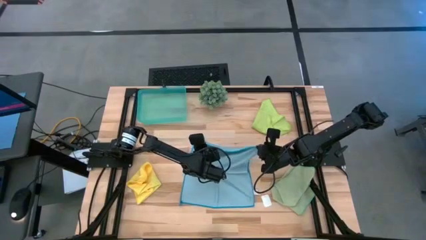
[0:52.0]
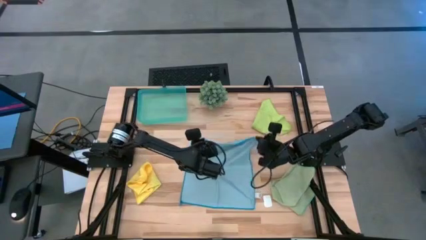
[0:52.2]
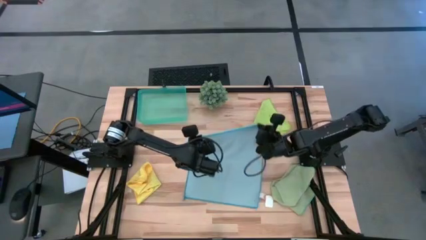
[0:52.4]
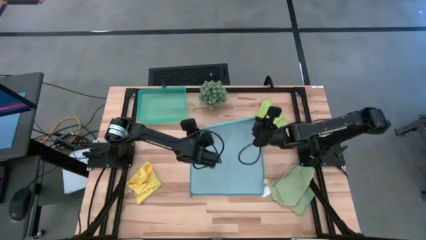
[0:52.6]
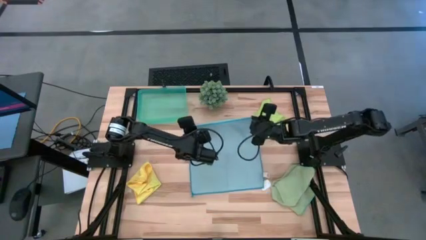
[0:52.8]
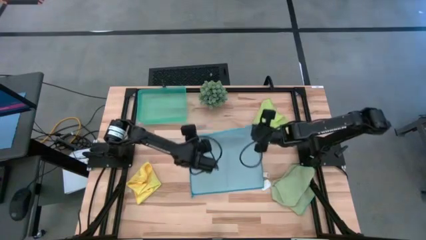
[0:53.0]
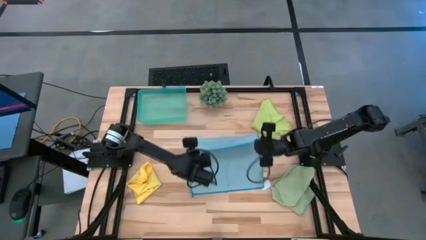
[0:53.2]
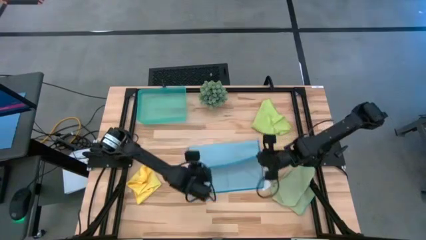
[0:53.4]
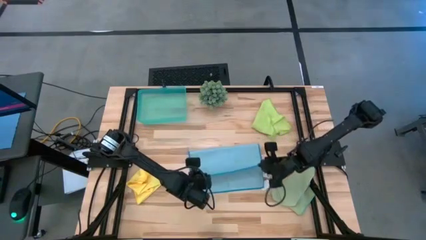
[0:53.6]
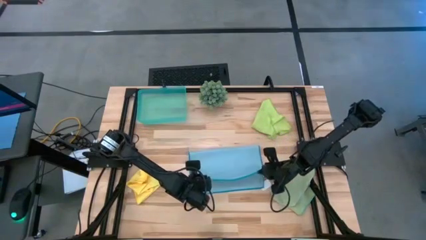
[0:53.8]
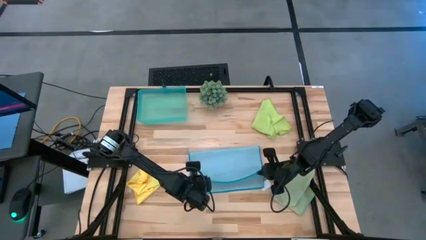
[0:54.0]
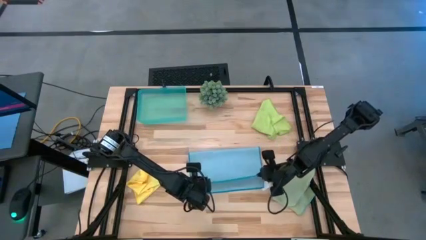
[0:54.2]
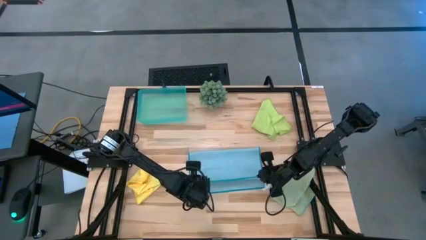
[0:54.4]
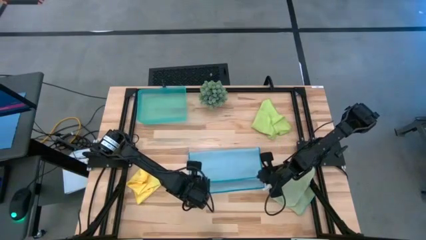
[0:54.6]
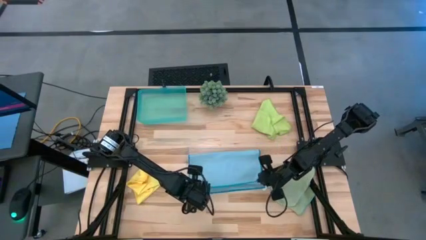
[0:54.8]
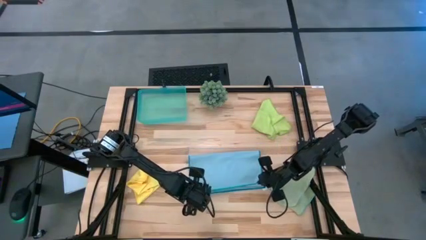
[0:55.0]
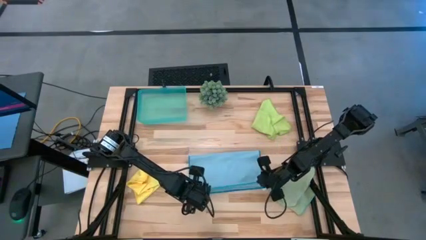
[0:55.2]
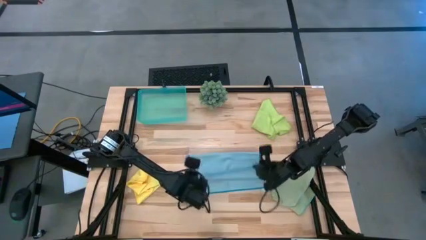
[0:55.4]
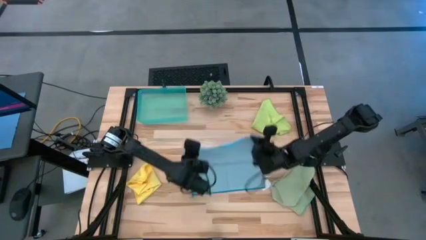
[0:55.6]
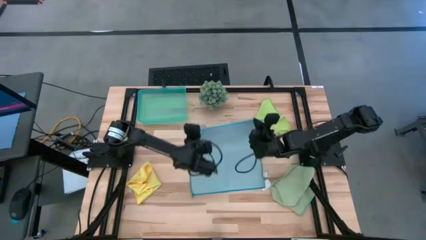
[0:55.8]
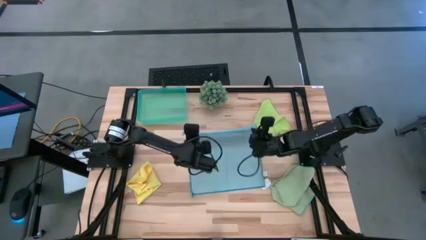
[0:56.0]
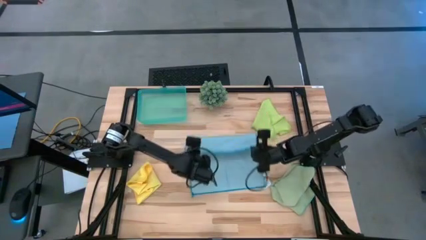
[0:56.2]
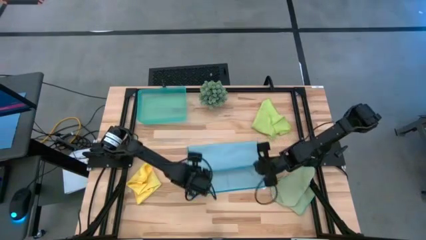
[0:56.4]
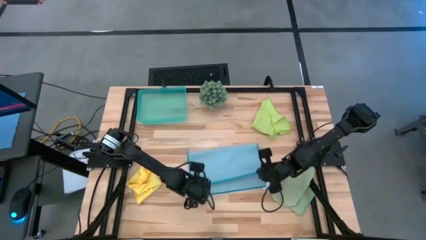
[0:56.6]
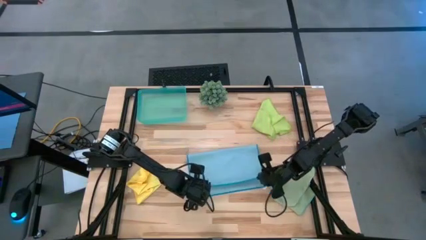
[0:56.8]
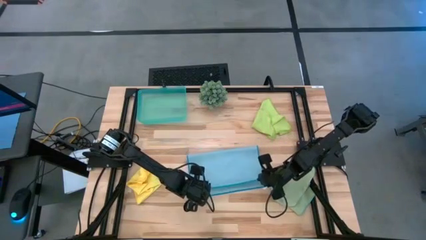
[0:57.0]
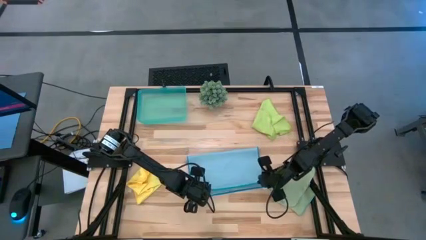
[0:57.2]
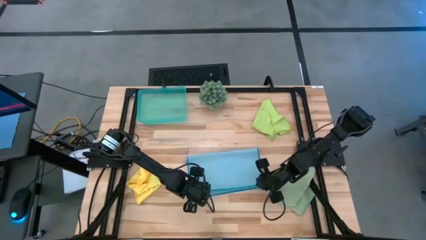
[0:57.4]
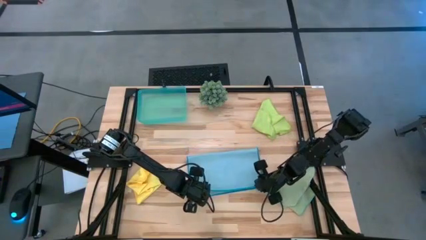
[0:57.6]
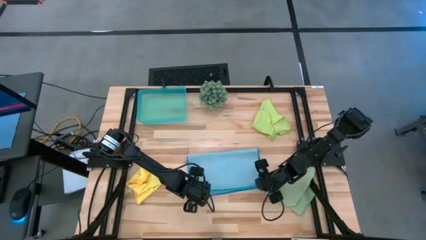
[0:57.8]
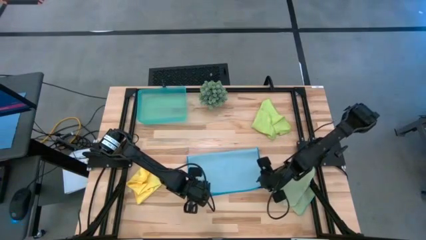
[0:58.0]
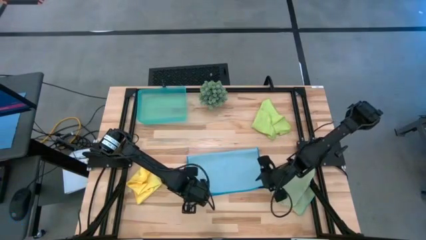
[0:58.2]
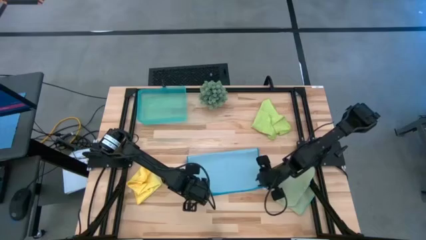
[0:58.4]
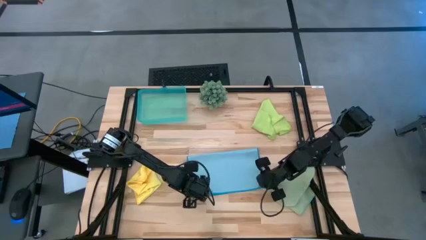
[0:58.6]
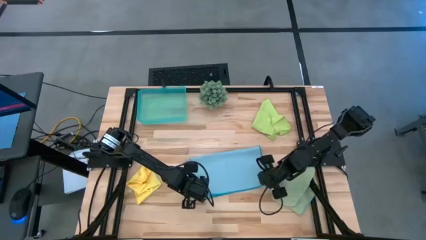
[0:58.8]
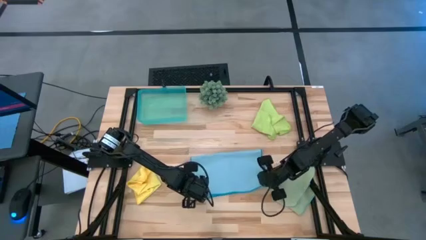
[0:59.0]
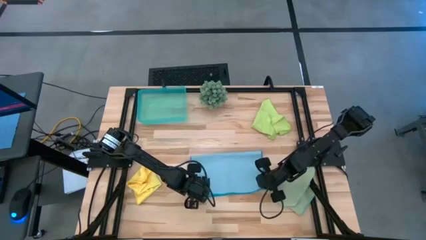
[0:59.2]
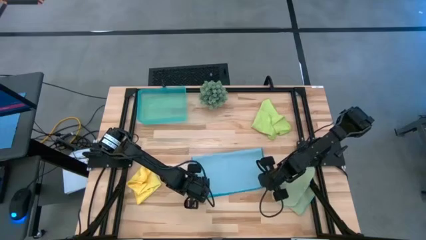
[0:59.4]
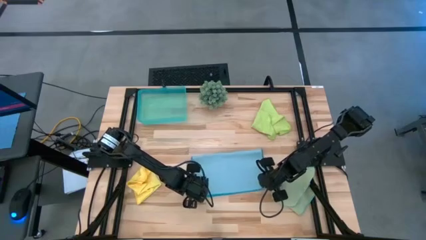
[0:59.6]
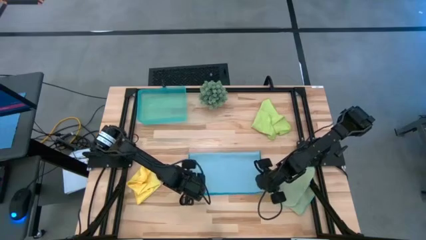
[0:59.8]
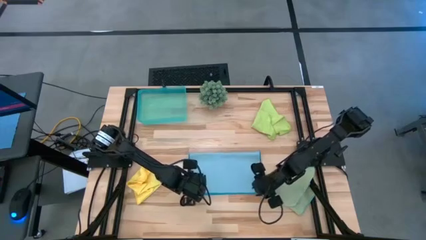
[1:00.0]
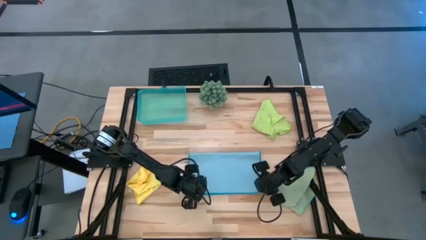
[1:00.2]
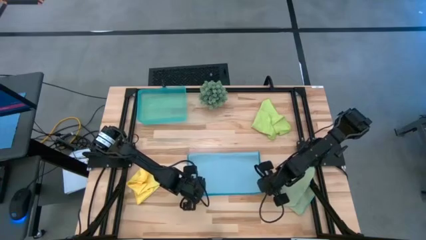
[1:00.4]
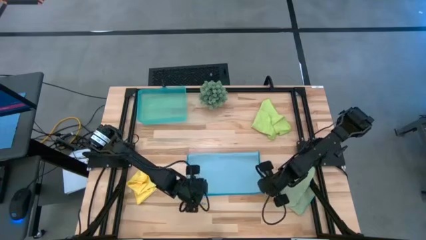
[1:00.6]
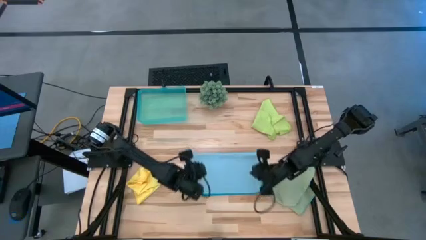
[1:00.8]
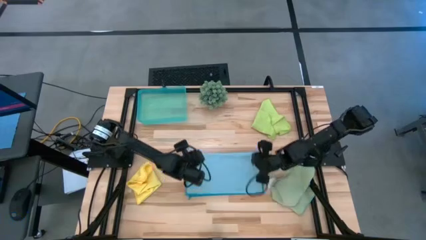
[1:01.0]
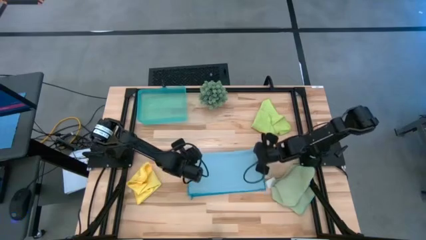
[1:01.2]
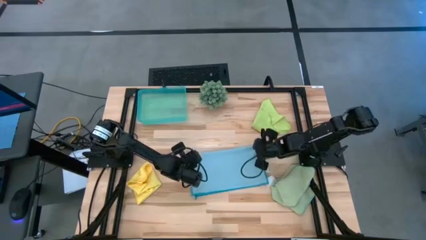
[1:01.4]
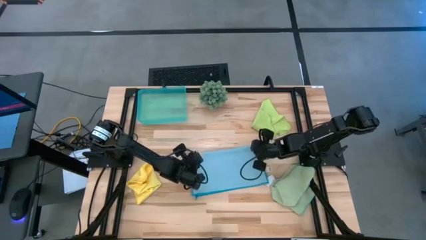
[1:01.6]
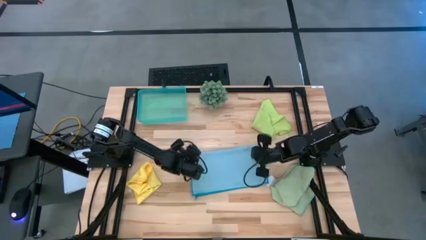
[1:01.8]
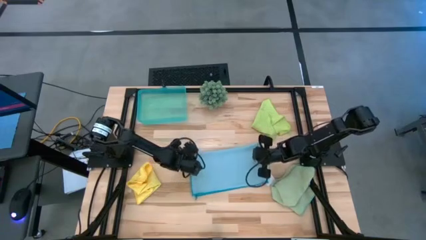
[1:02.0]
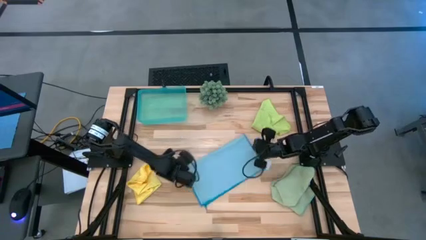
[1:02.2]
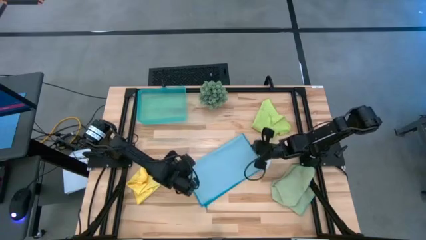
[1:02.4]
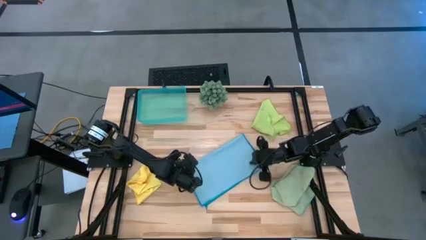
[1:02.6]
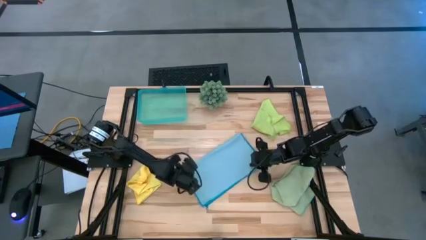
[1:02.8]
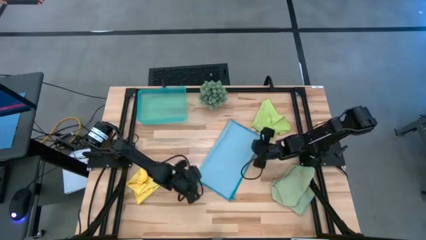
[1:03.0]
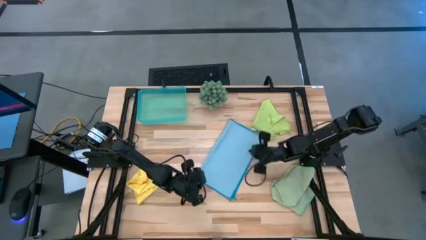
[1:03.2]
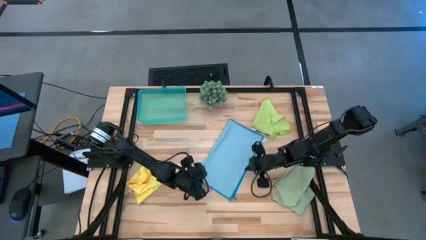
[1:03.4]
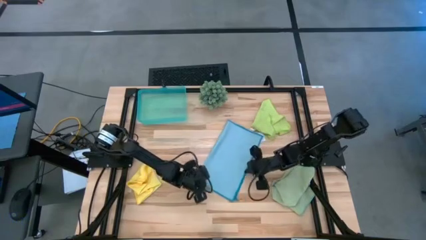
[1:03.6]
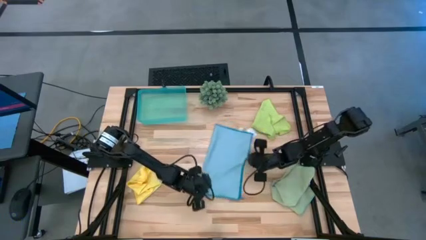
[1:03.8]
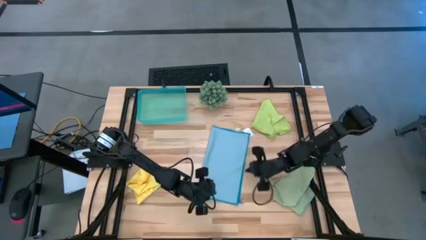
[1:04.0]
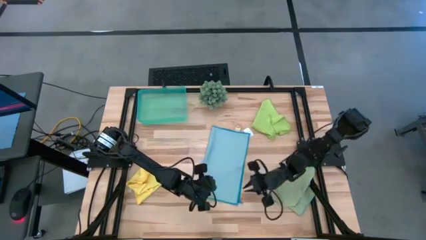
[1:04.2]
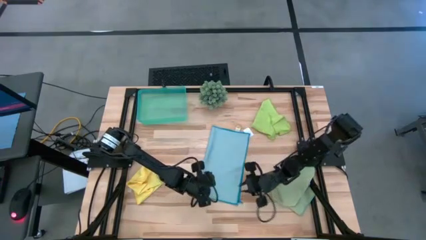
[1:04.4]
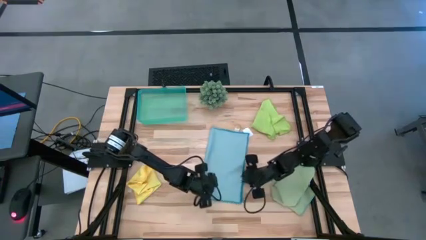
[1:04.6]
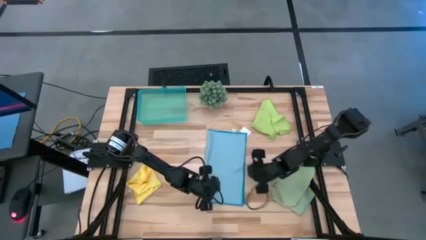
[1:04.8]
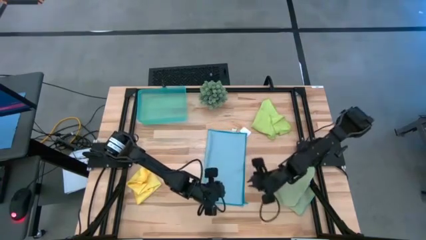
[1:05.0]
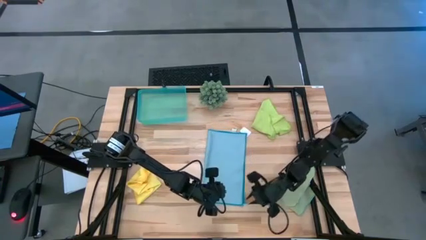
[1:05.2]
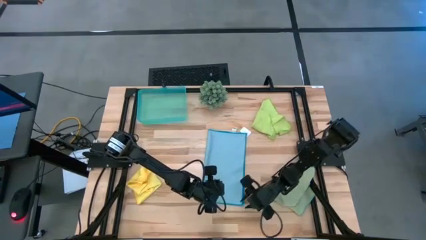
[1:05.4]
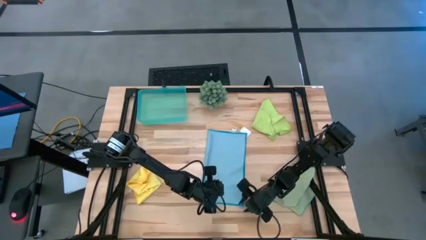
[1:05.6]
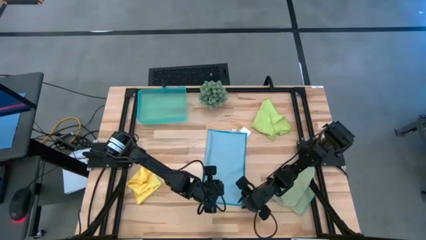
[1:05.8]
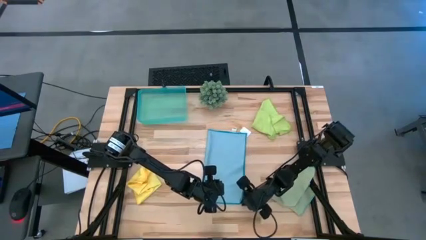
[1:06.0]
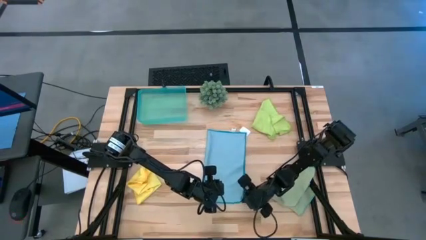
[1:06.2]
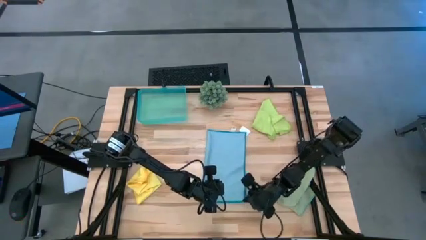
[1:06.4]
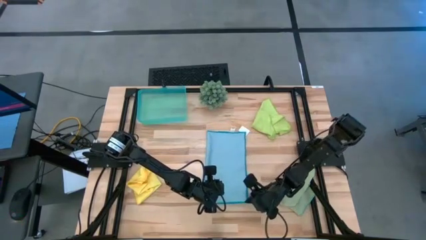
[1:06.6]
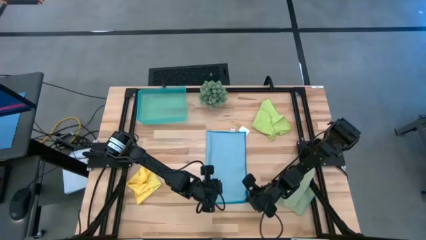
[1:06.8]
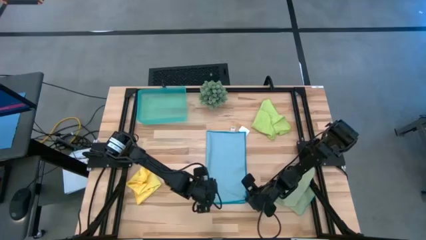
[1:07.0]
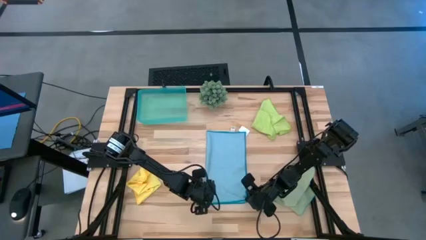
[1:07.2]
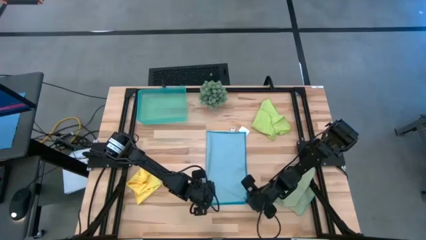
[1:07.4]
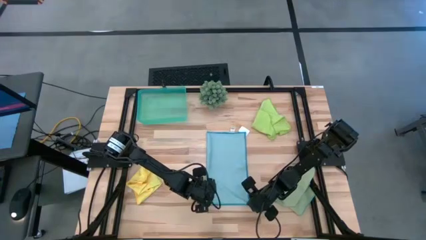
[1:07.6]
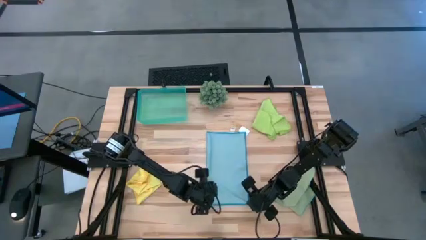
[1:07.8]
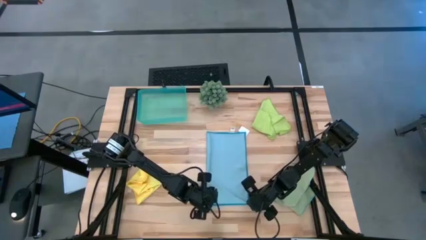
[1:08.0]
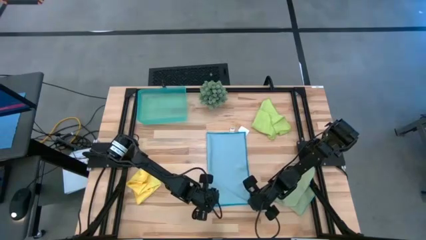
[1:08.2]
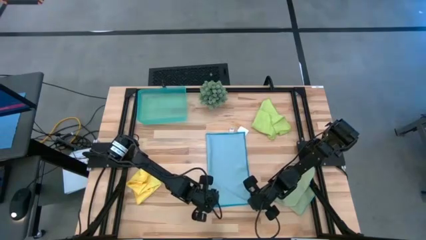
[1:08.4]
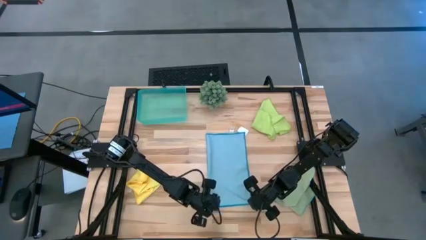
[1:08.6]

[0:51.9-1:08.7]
Task: Fold microfiber towels
Fold the blue microfiber cloth
